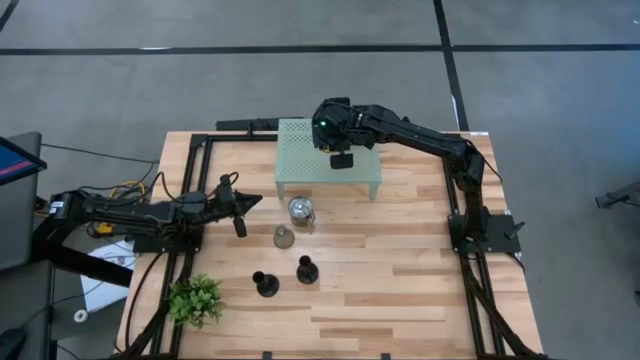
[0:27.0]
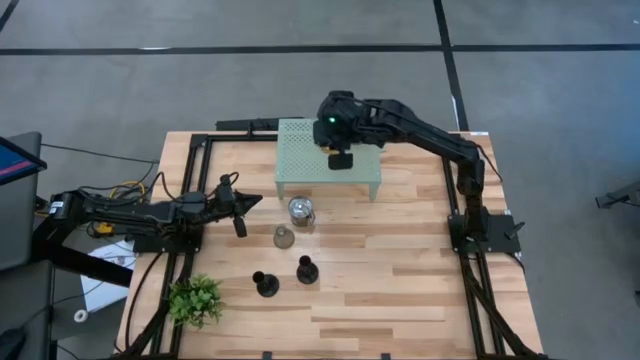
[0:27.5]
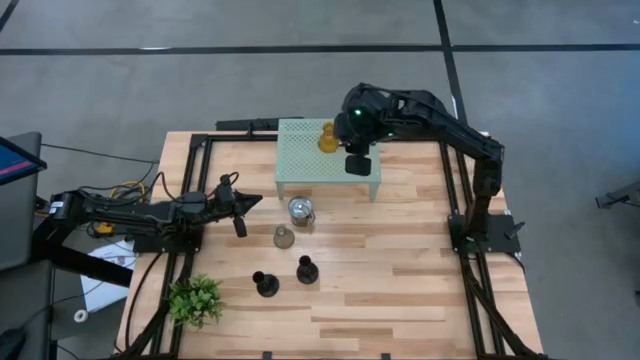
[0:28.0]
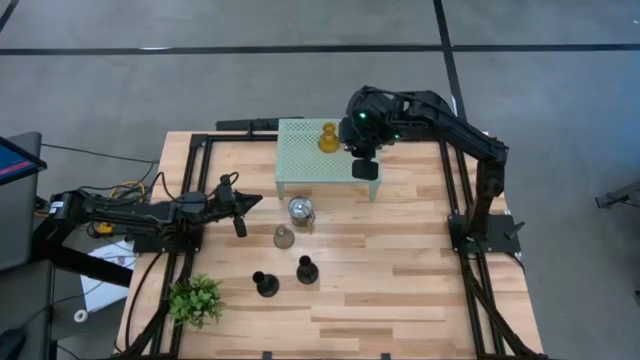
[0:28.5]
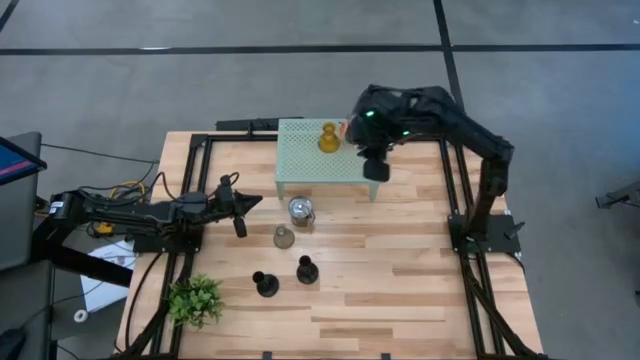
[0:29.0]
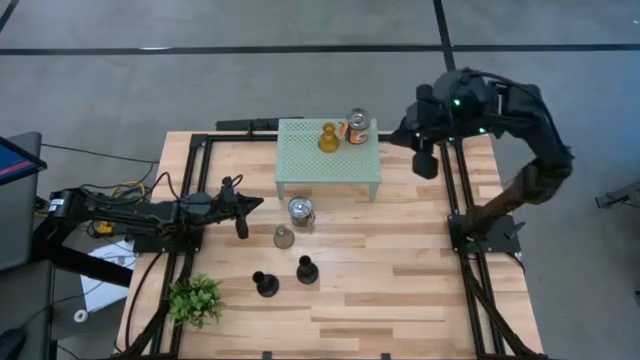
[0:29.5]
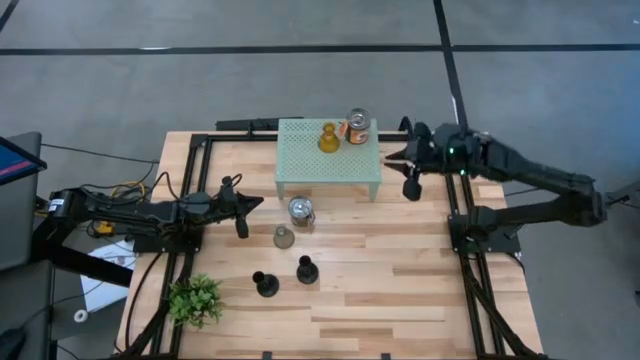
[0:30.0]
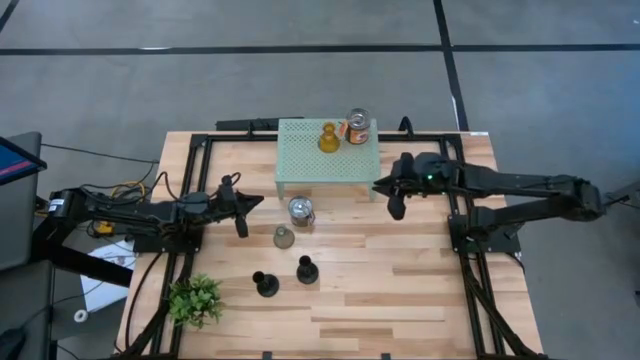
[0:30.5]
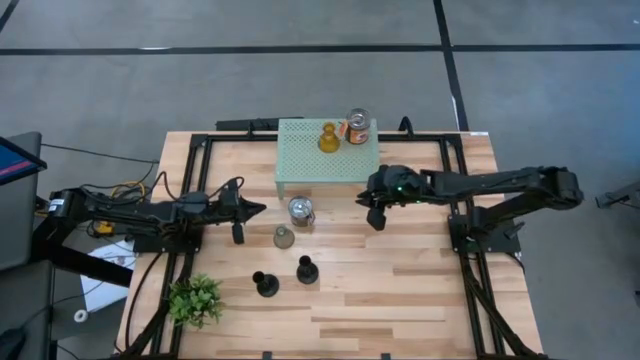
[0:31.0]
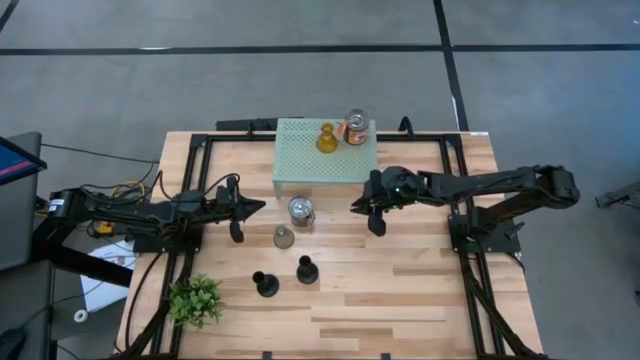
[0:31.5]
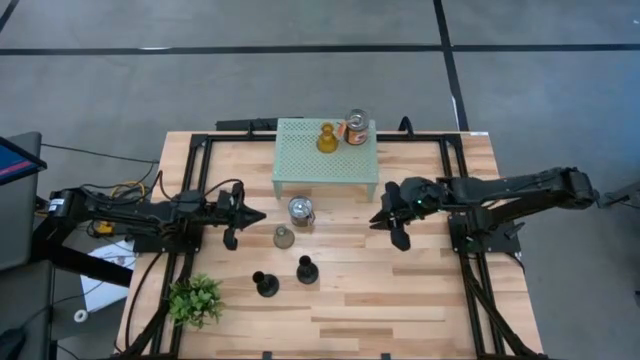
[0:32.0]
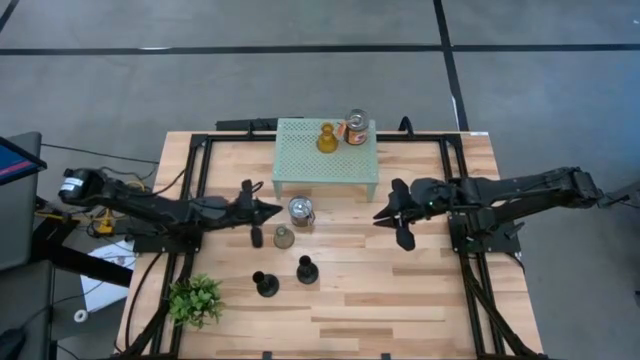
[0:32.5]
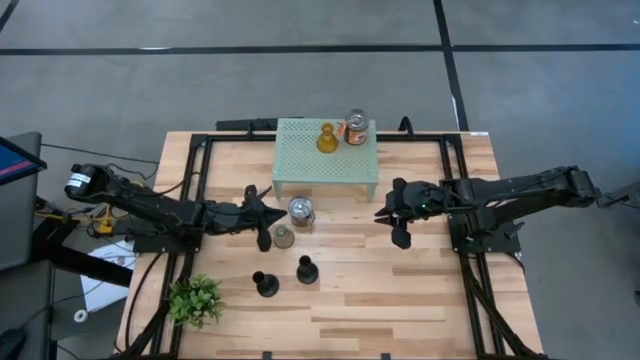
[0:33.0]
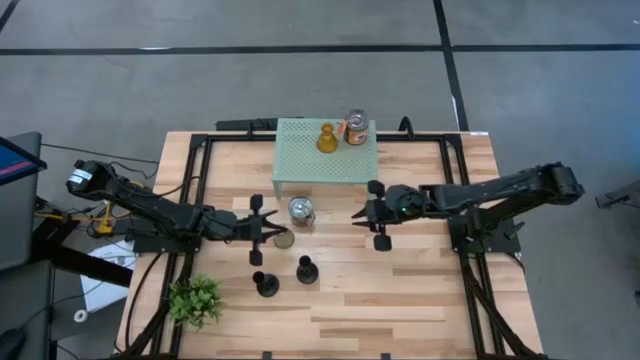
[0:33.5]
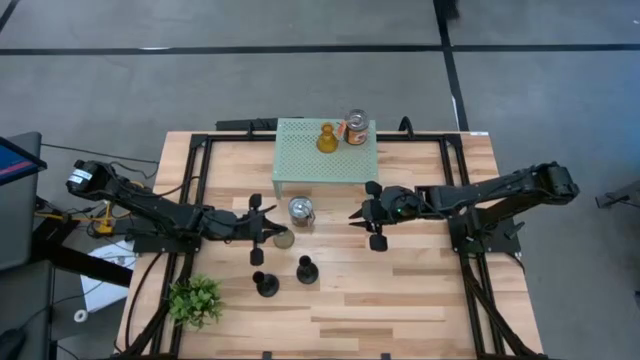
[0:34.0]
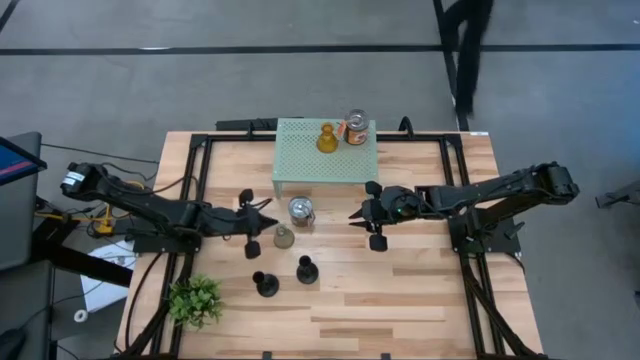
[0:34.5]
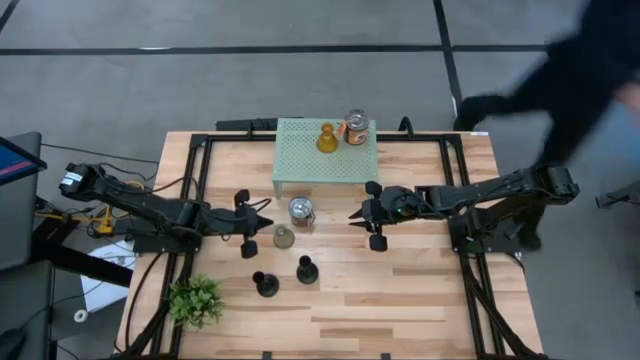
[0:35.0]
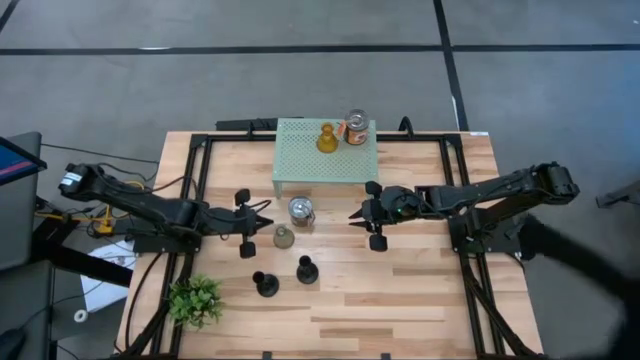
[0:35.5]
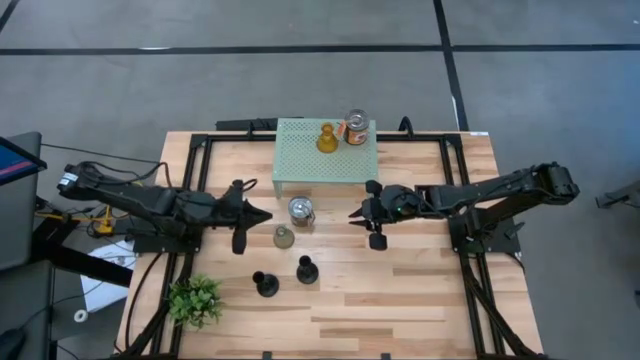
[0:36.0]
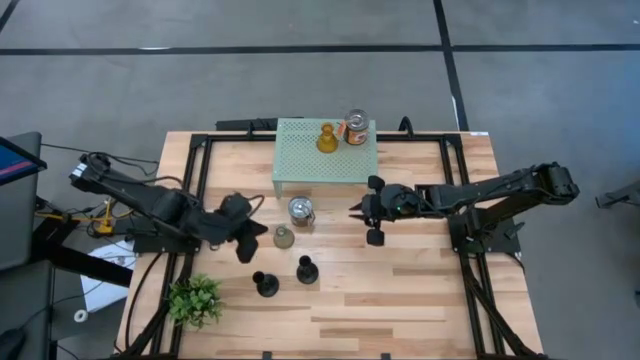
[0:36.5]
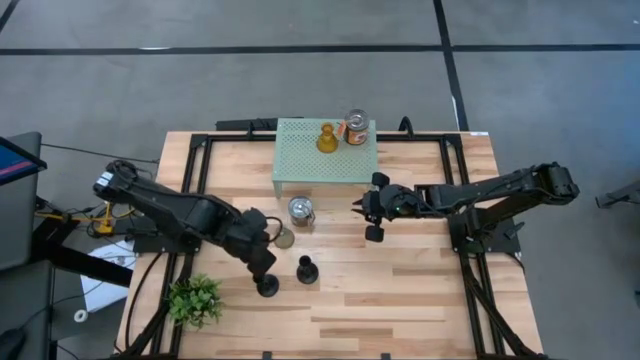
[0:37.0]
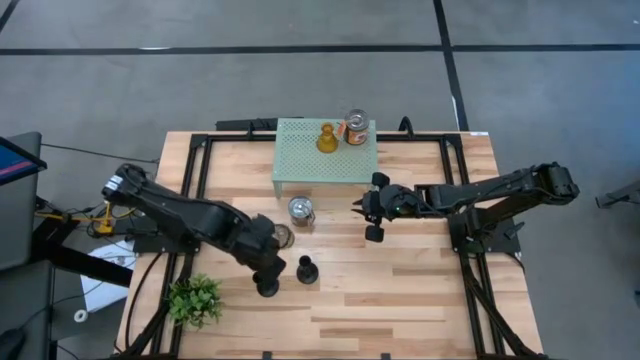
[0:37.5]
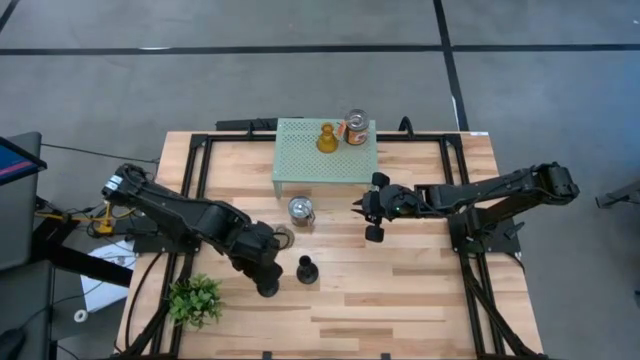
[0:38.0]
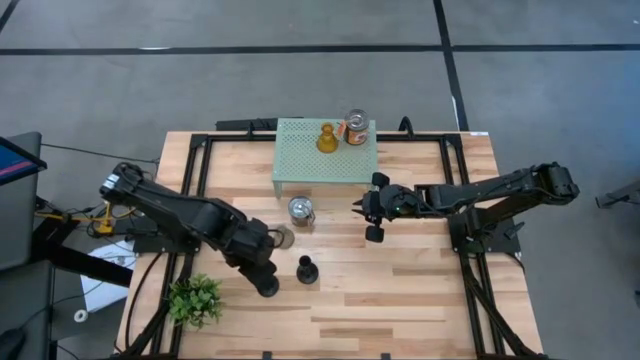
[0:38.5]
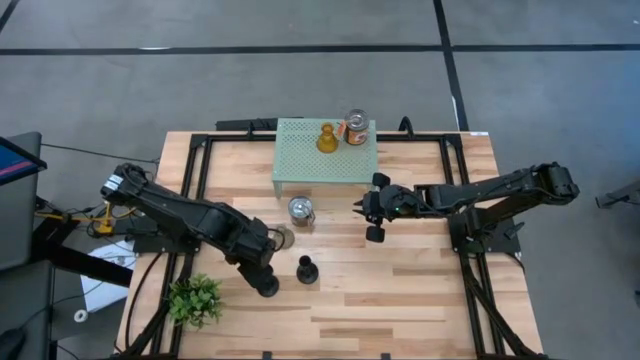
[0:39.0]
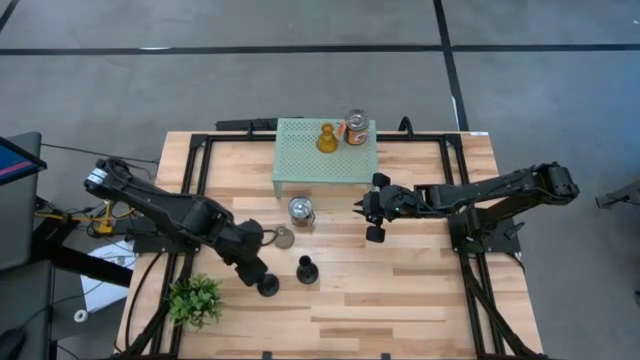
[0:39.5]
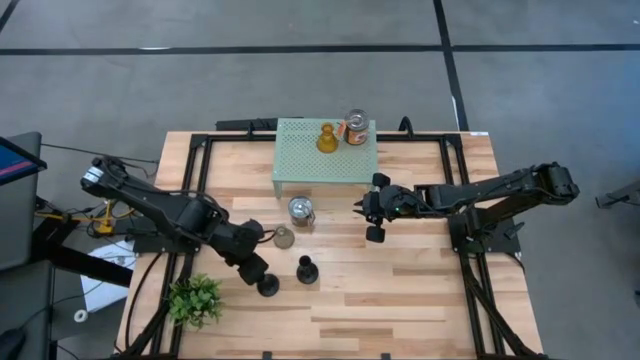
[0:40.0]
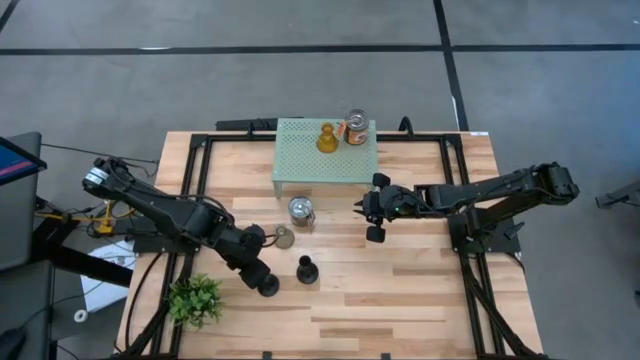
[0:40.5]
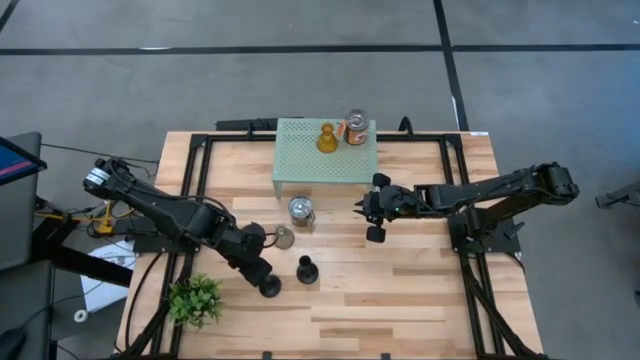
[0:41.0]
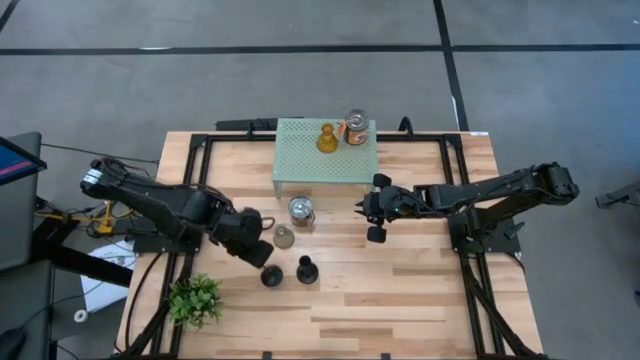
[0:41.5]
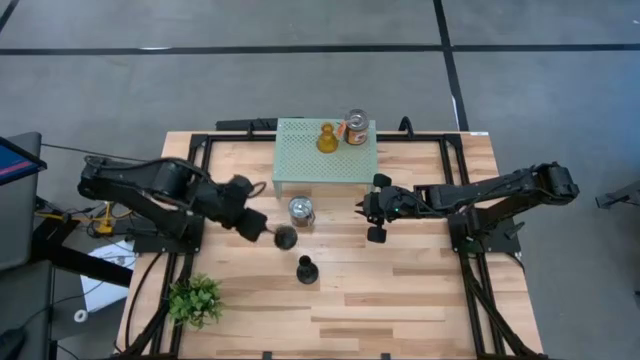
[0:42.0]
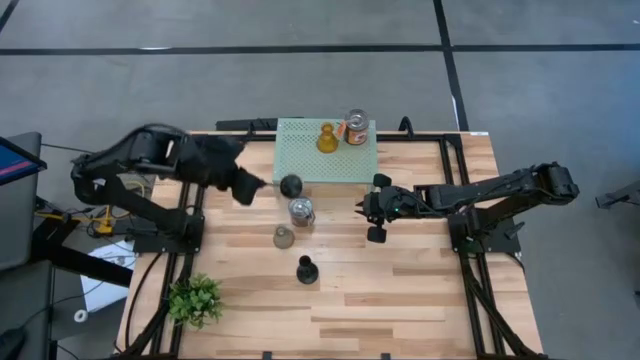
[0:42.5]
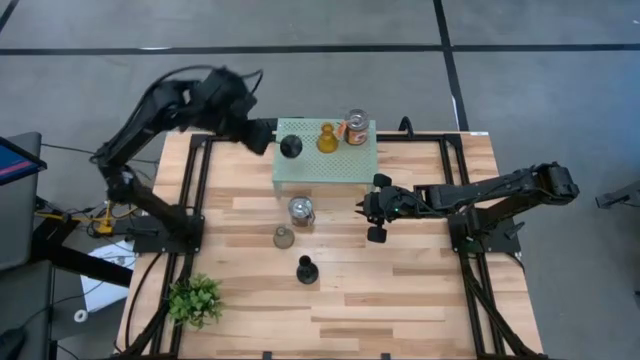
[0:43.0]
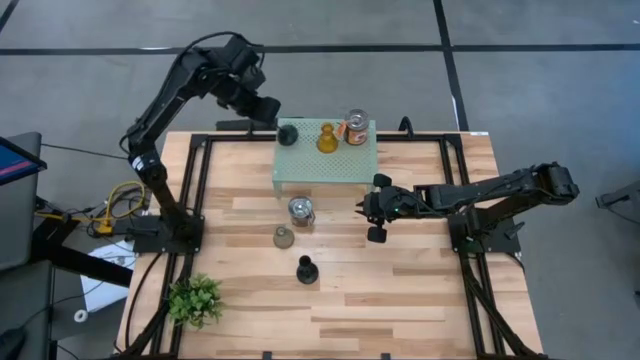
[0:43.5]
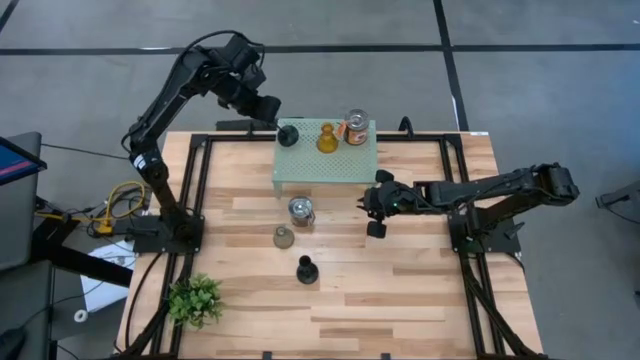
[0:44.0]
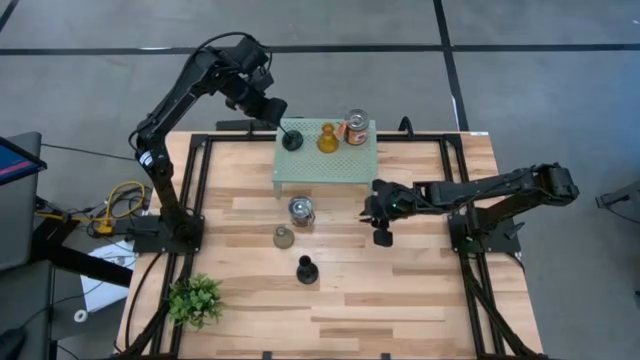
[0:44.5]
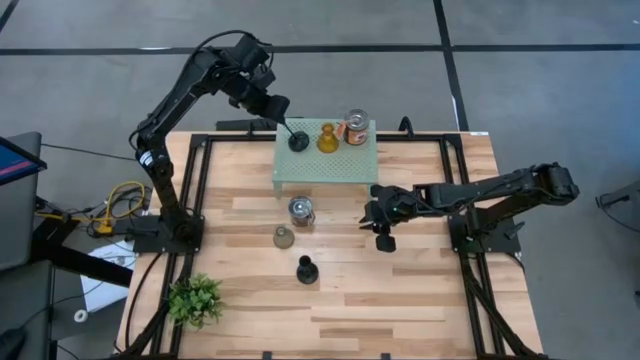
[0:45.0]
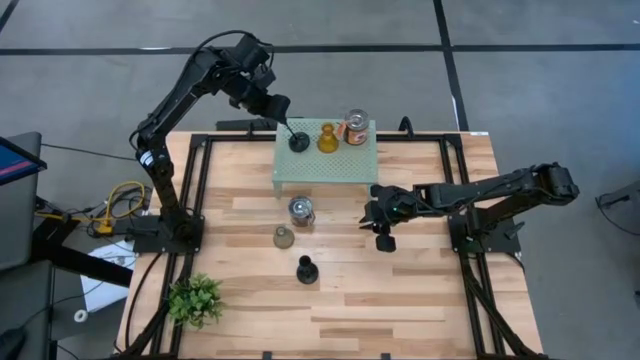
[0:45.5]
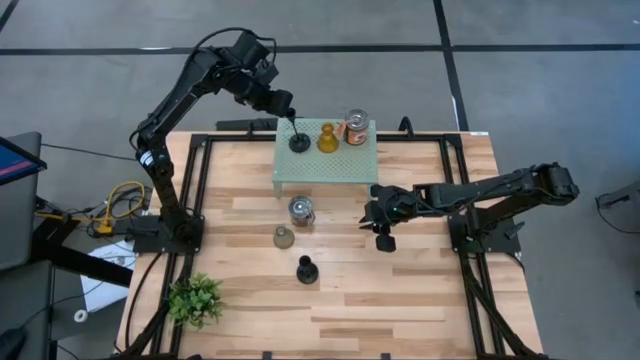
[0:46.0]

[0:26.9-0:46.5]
Task: Pick & Place candle stick holders
Put the left black holder on the shelf

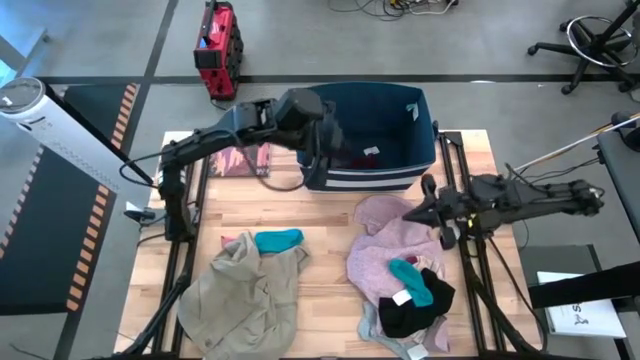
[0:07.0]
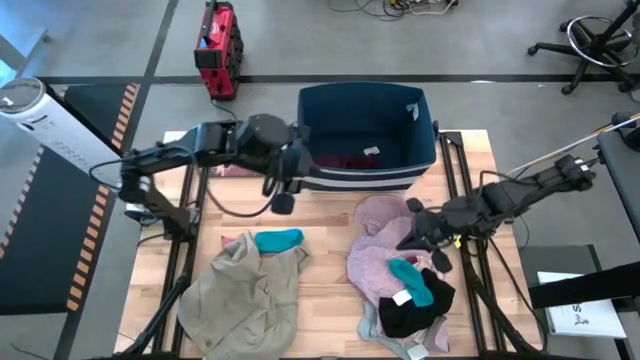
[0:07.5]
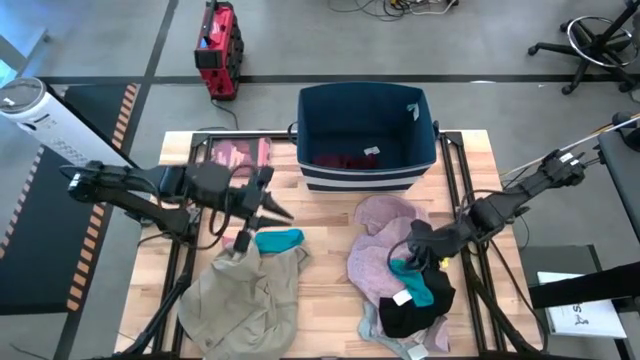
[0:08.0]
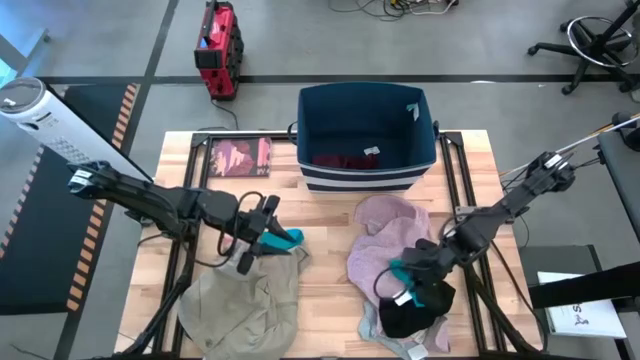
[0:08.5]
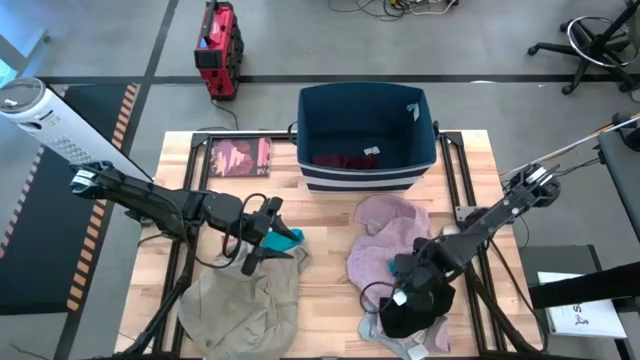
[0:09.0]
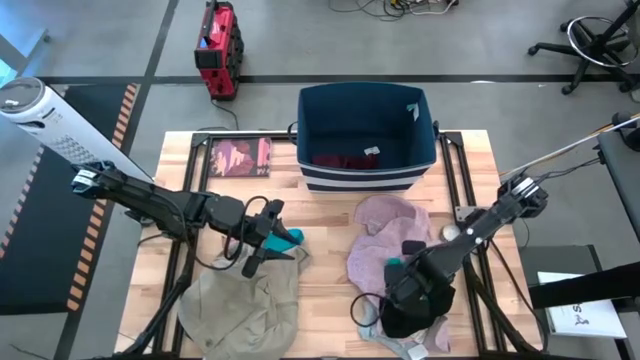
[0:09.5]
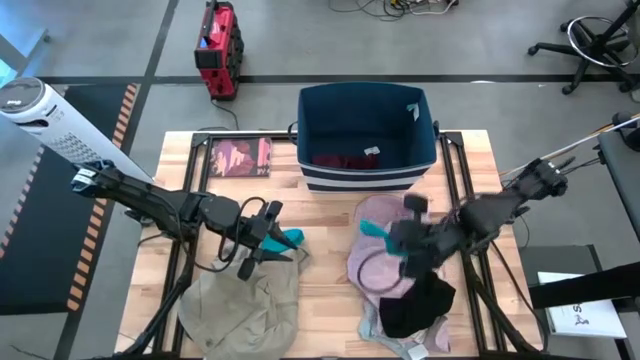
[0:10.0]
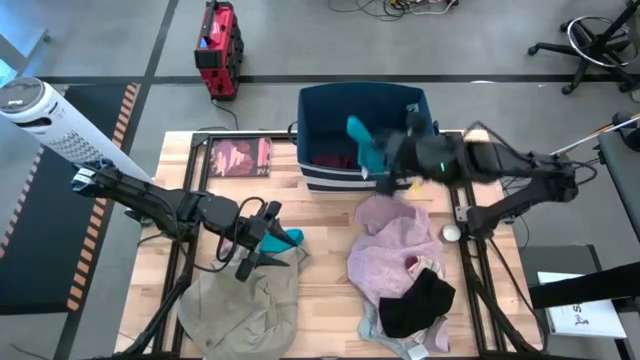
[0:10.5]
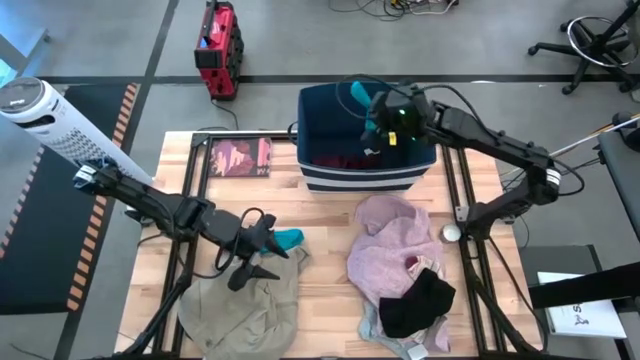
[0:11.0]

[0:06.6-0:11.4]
Task: Sort clothes
Put the right blue sock into the blue laundry bin
